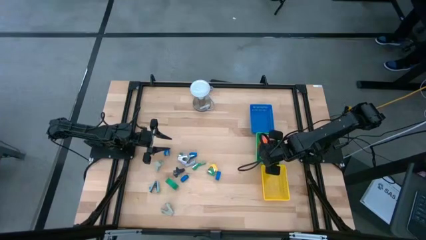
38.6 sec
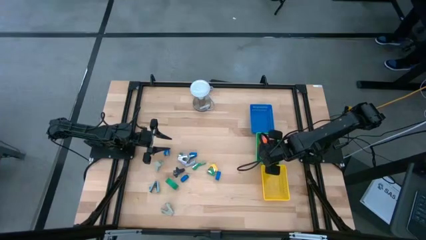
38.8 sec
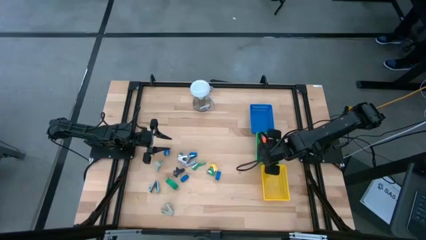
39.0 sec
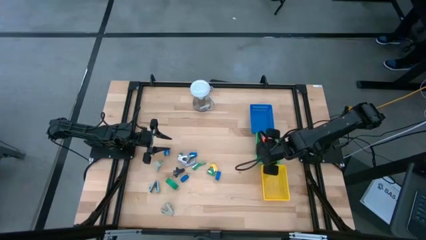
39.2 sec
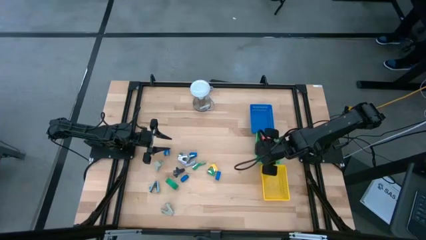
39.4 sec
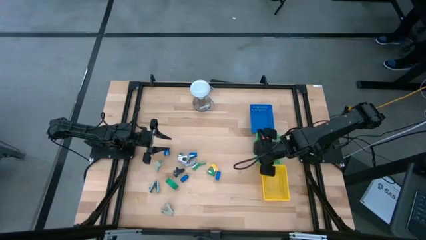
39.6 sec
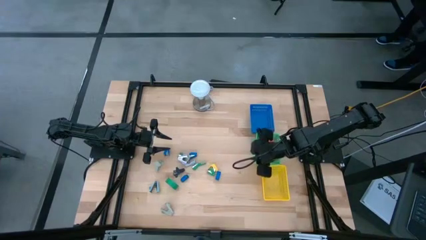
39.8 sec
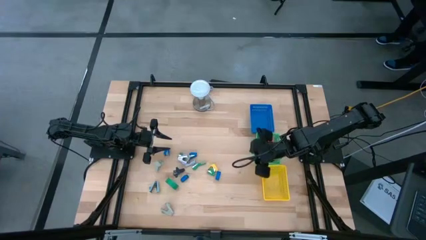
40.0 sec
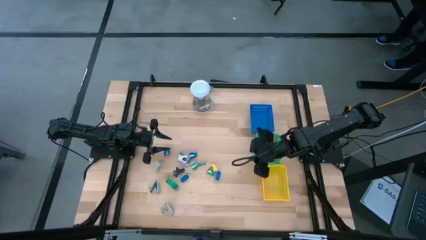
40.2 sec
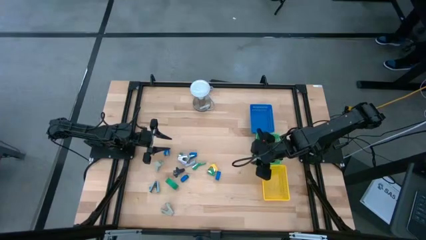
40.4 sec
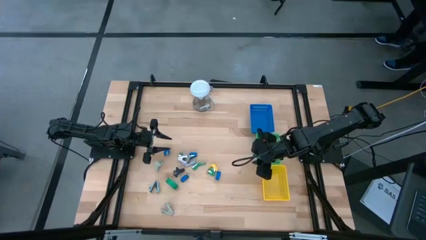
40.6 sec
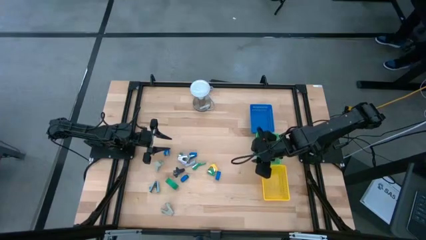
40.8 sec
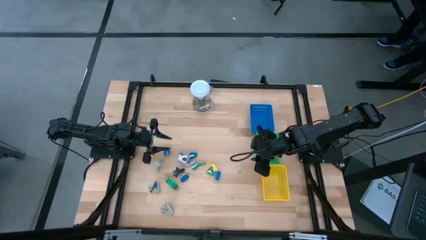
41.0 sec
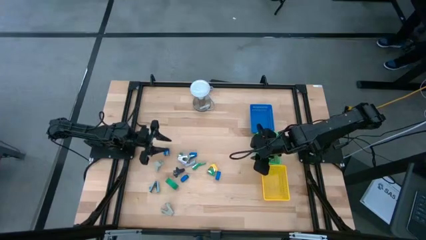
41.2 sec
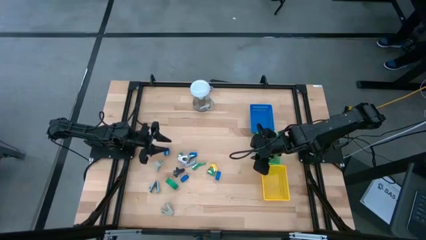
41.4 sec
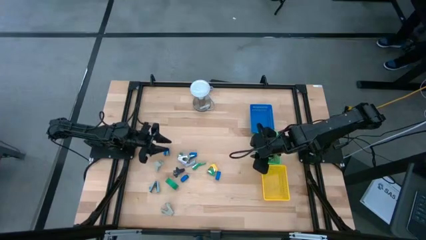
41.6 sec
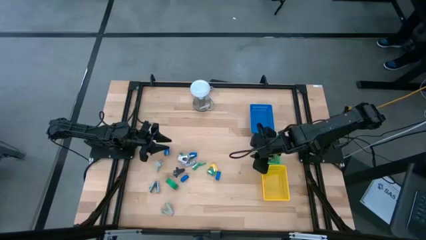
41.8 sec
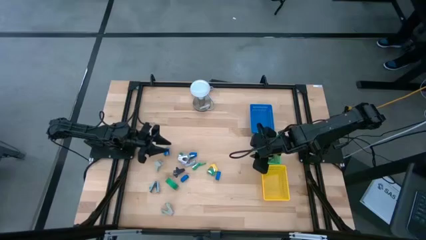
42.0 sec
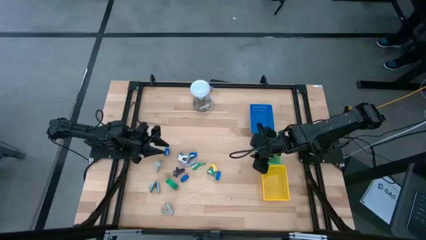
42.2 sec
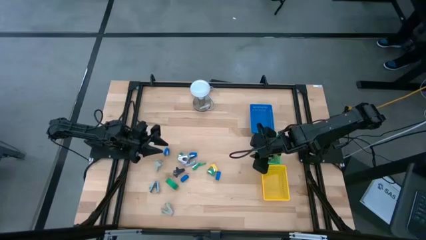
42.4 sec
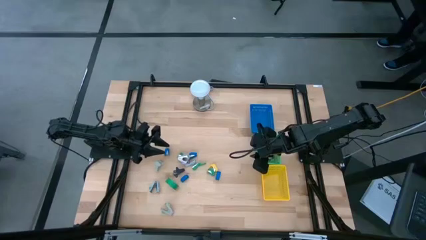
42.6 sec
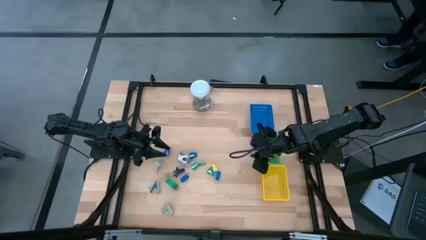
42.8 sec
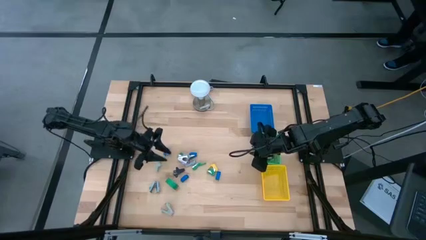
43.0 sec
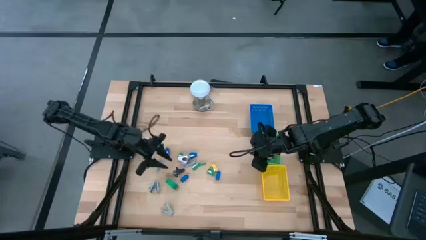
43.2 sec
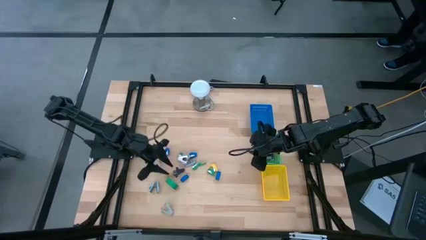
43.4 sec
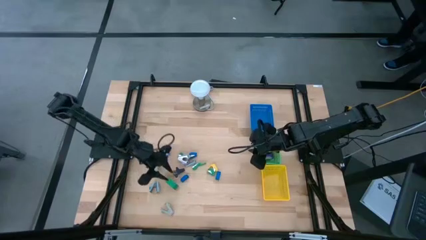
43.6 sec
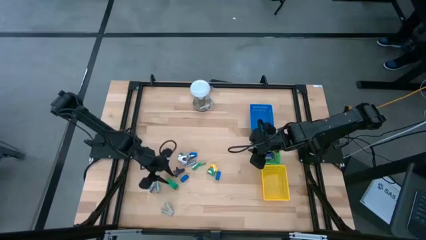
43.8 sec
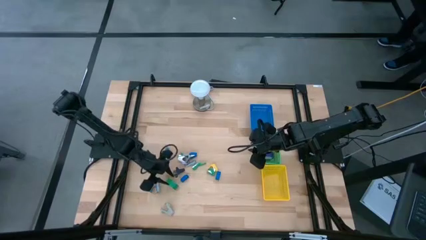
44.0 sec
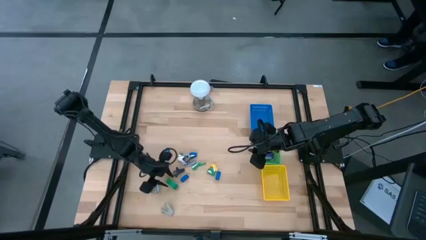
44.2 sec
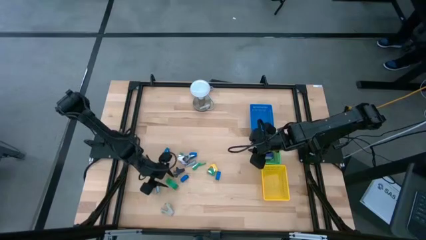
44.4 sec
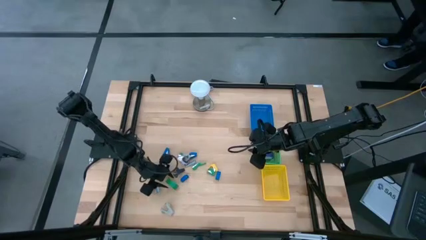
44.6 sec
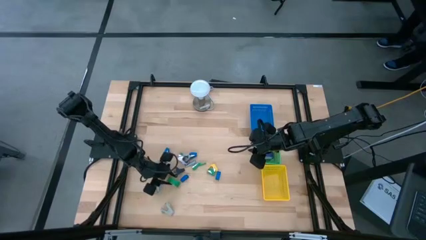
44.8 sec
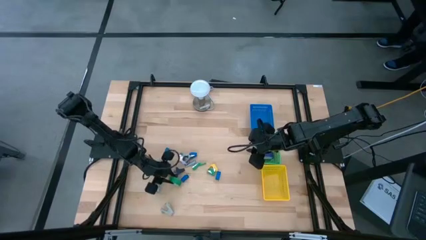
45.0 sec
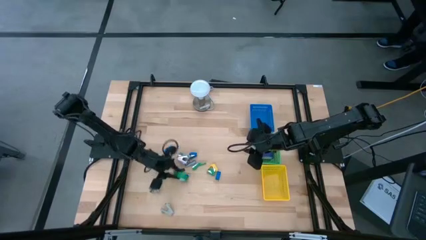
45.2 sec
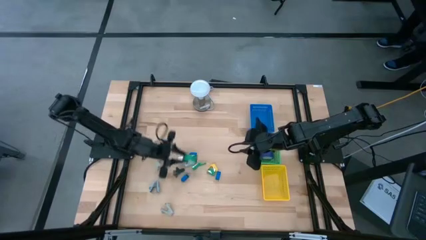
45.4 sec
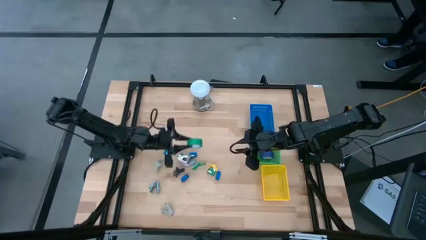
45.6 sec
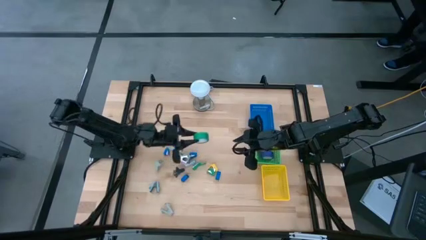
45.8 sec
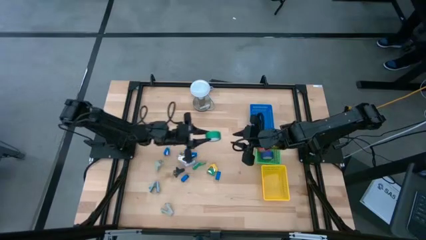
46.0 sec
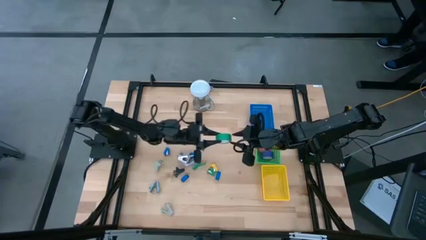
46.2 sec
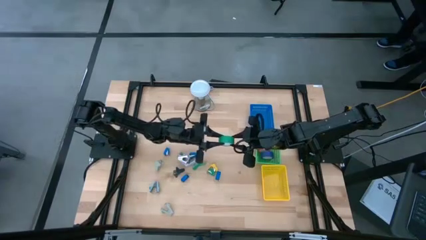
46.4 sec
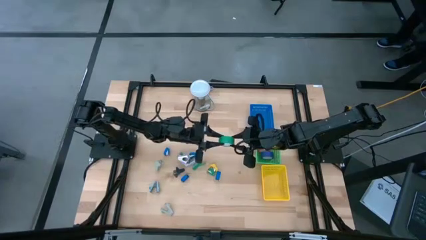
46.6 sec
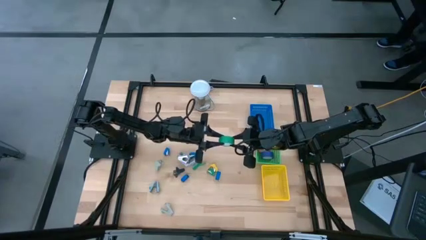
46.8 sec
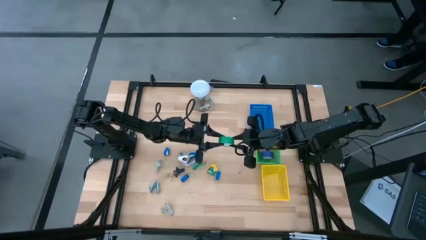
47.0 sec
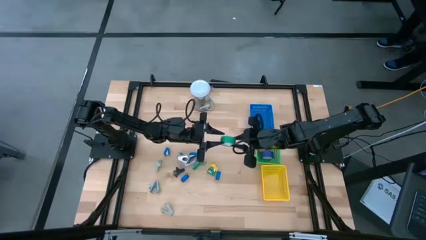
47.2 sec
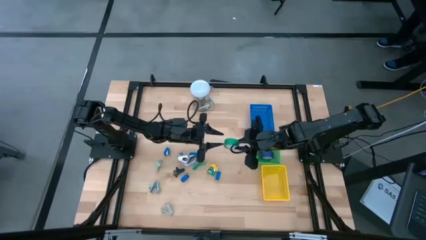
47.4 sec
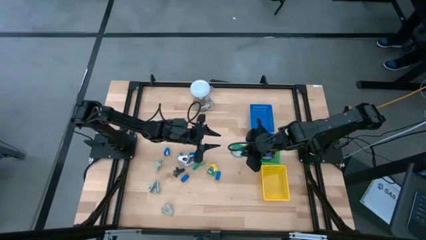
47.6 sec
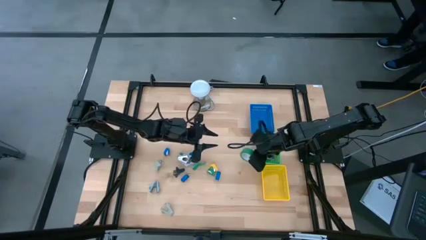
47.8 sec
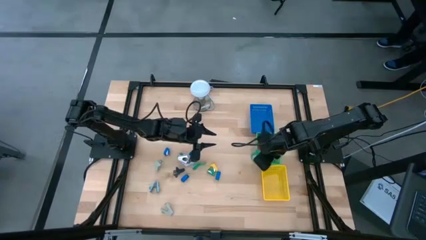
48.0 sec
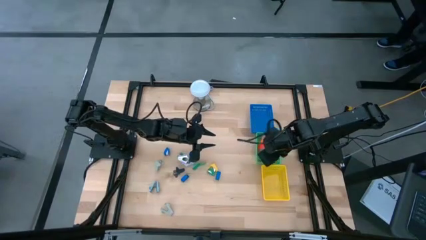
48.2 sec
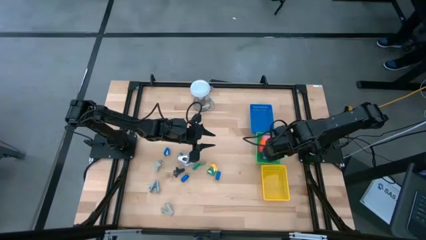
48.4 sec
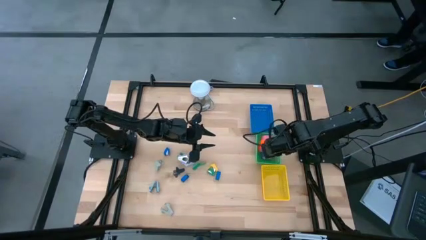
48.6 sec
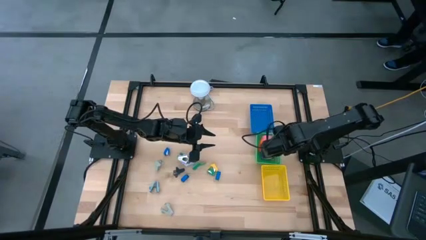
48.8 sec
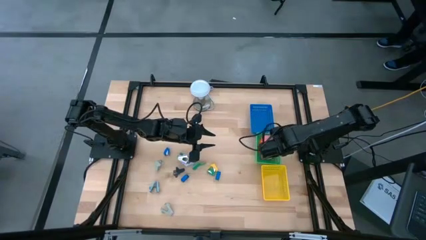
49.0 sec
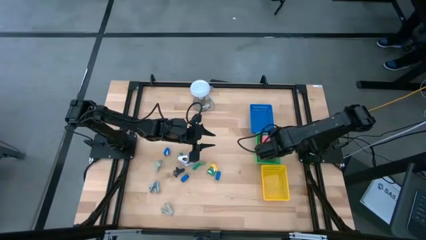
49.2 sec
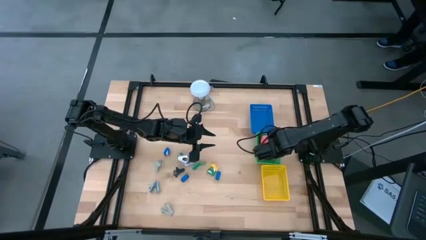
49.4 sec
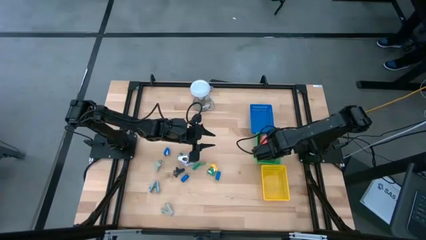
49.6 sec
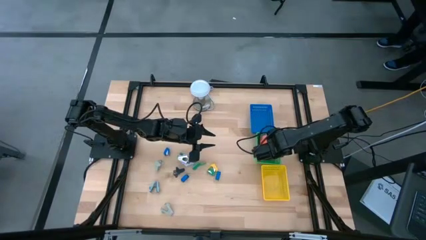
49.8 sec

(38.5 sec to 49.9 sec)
Task: Pick and place Stapler, Stapler remover, tape
Put the green tape into the green bin

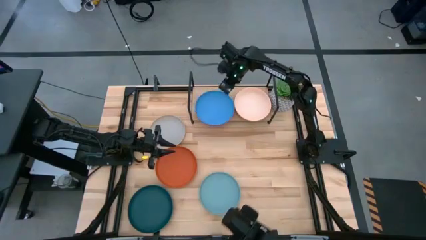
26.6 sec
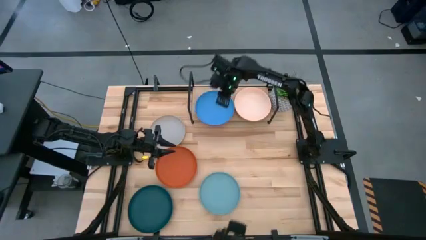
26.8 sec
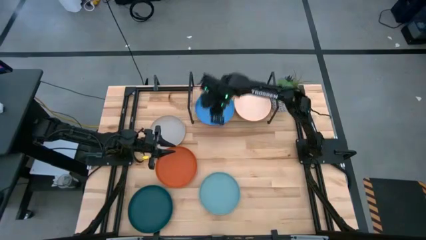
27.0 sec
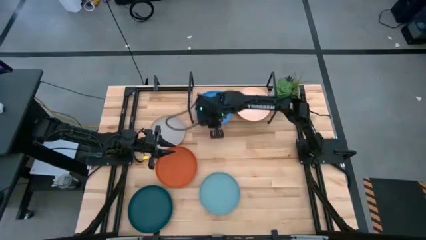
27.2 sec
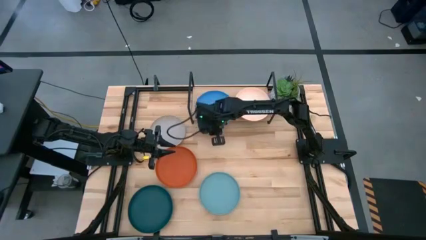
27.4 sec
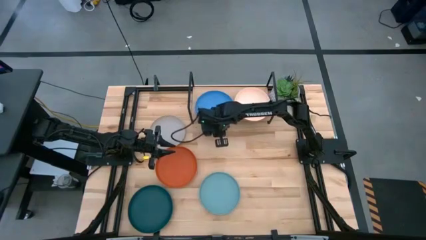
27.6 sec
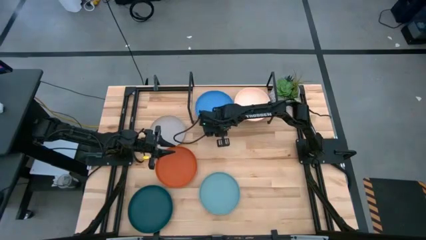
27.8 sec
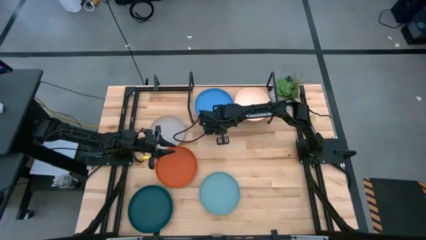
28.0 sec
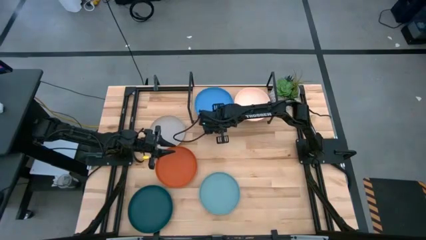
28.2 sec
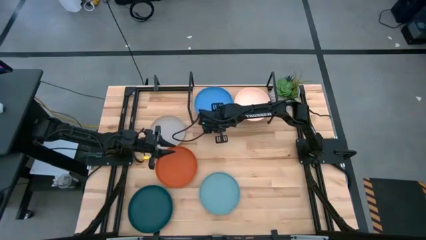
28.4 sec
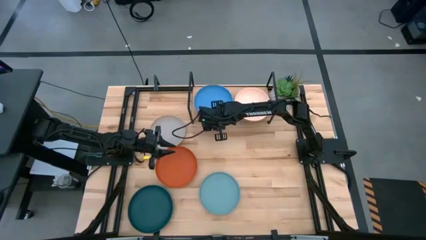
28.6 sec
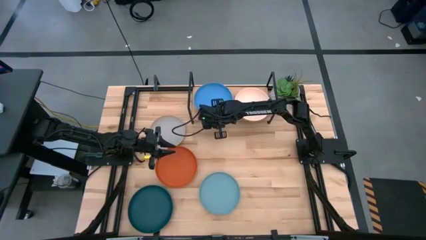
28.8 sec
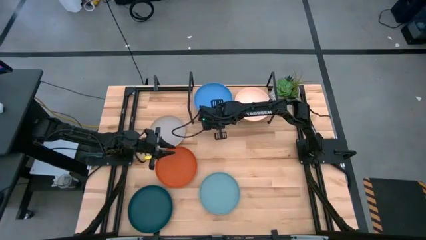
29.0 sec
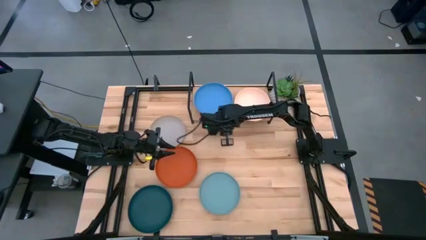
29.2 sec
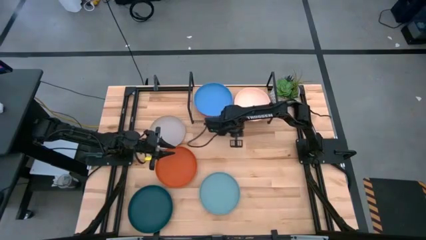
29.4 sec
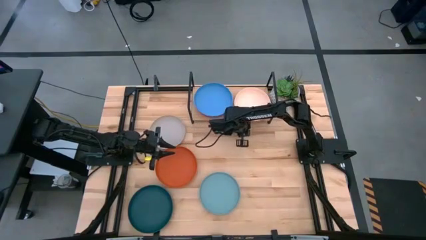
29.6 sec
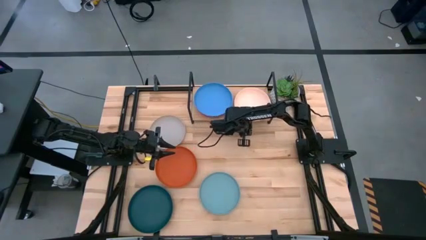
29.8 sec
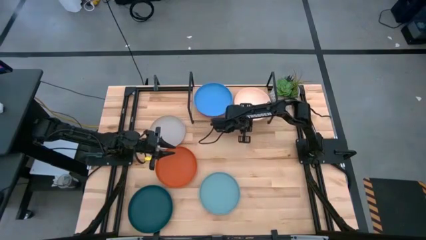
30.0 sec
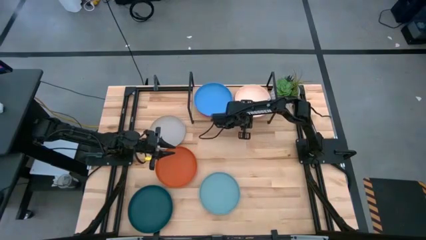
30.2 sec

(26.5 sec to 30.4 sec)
Task: Place and stack plates onto a shelf
Adjust the stacked plates on the shelf
